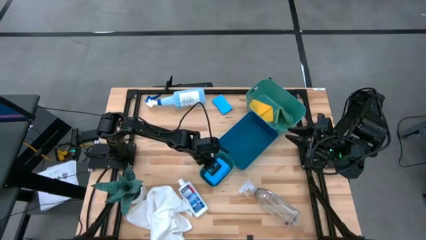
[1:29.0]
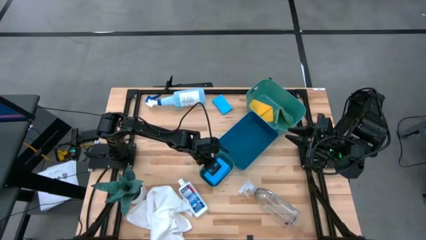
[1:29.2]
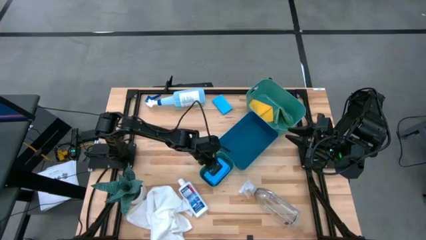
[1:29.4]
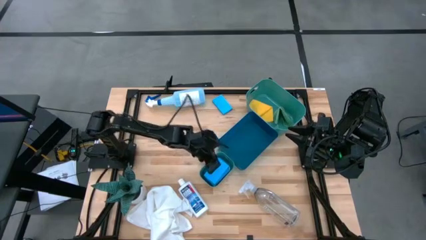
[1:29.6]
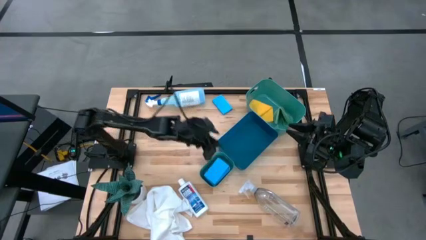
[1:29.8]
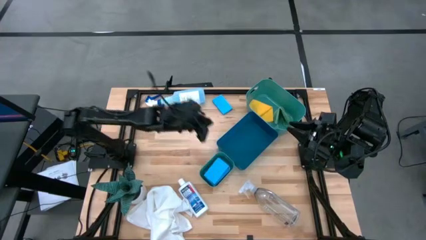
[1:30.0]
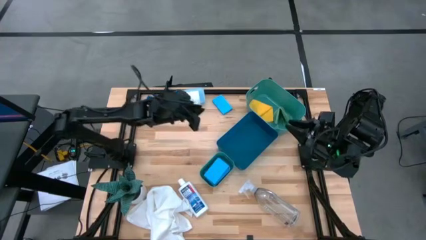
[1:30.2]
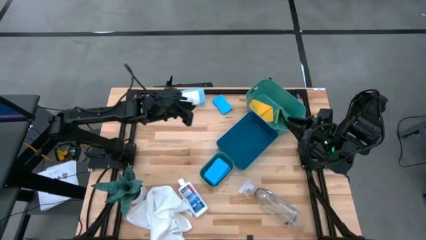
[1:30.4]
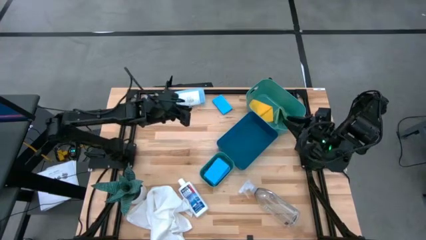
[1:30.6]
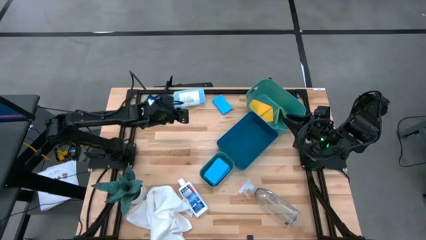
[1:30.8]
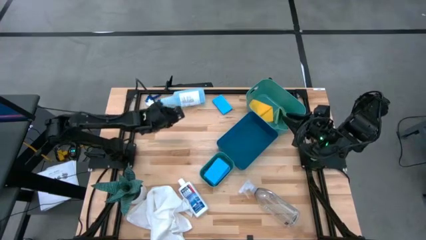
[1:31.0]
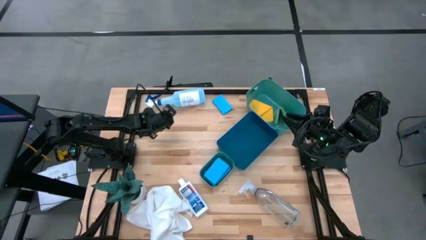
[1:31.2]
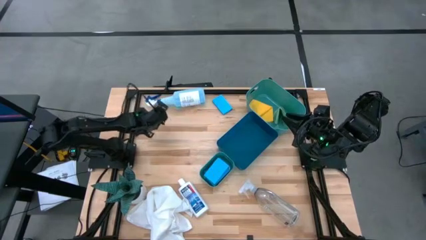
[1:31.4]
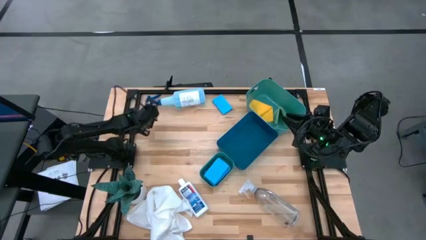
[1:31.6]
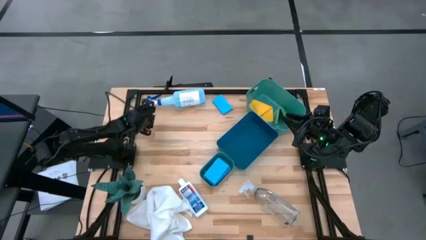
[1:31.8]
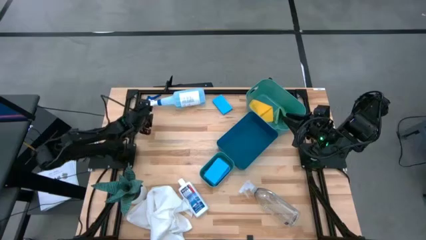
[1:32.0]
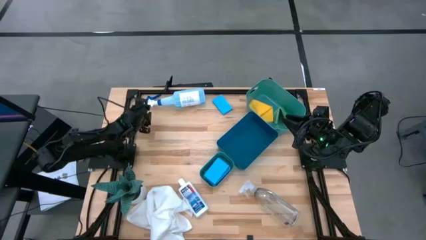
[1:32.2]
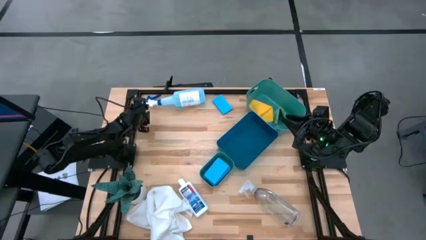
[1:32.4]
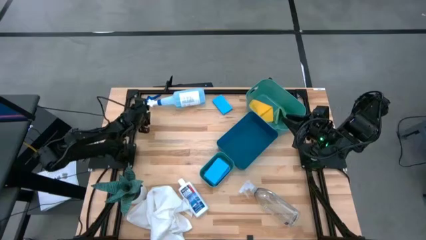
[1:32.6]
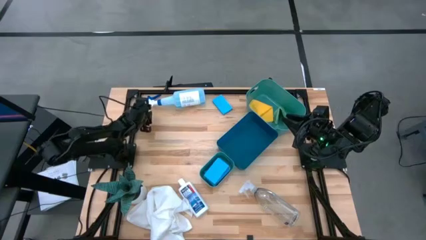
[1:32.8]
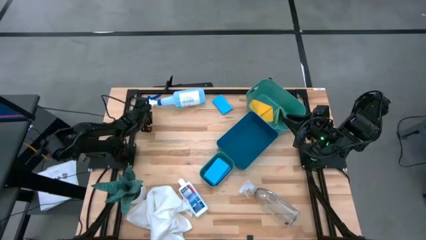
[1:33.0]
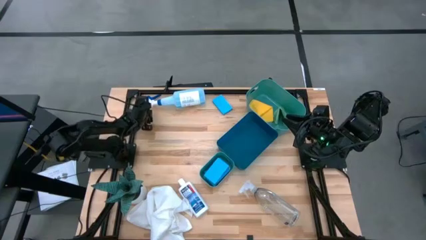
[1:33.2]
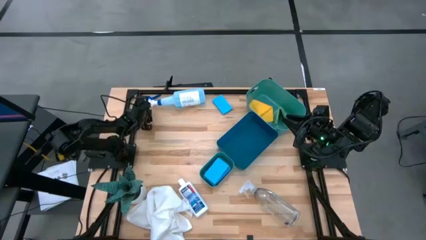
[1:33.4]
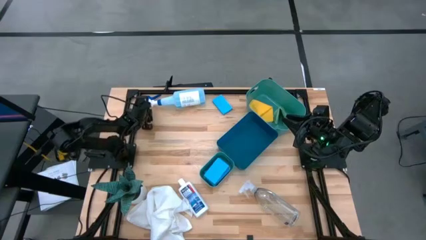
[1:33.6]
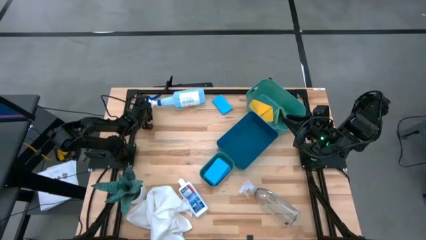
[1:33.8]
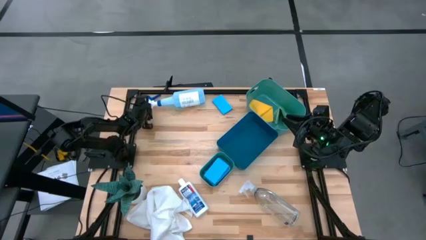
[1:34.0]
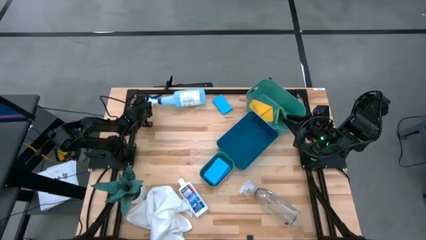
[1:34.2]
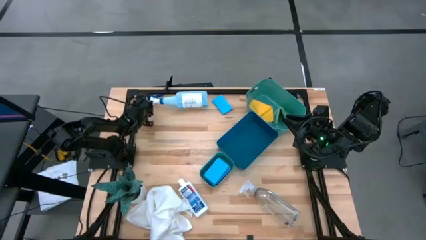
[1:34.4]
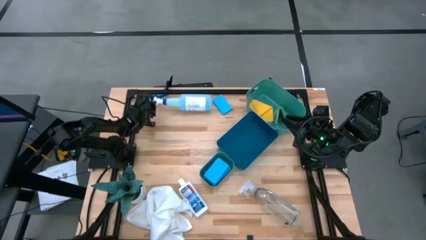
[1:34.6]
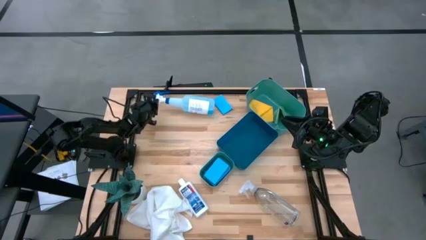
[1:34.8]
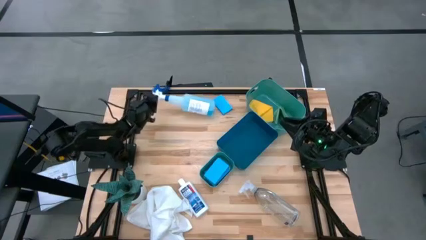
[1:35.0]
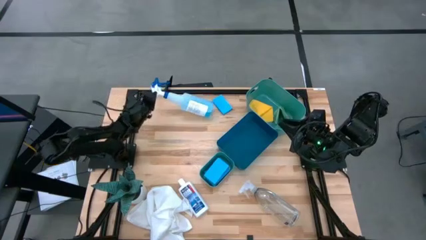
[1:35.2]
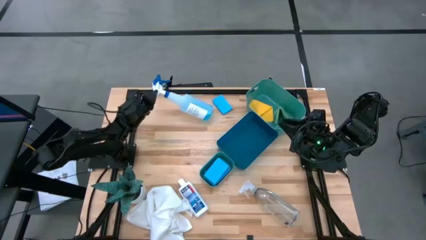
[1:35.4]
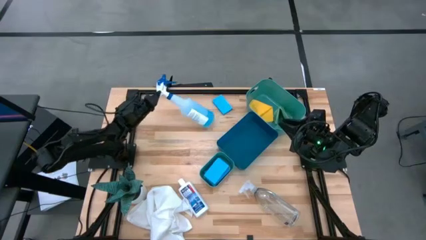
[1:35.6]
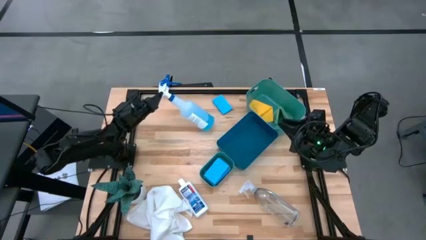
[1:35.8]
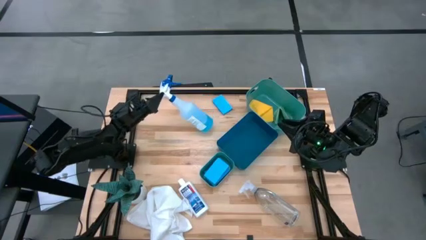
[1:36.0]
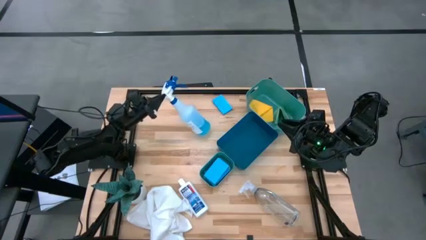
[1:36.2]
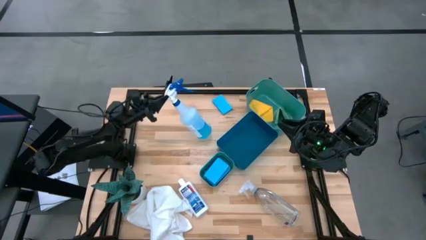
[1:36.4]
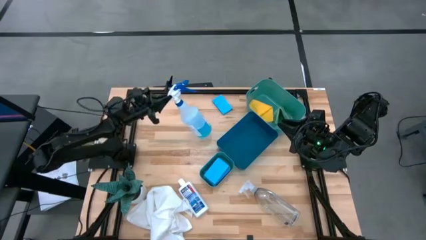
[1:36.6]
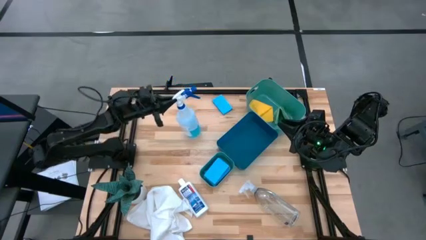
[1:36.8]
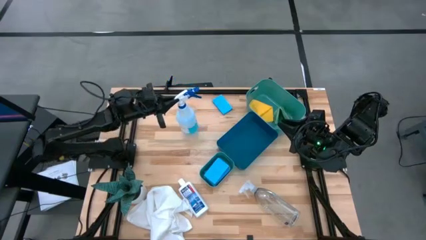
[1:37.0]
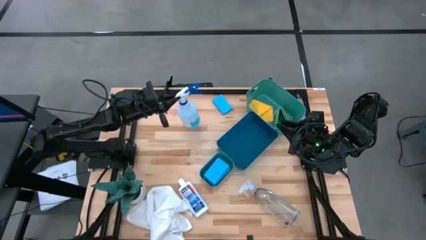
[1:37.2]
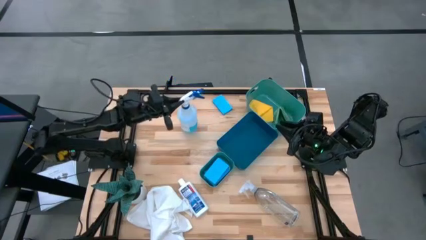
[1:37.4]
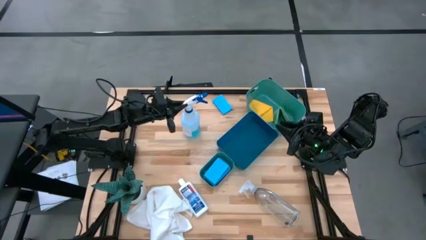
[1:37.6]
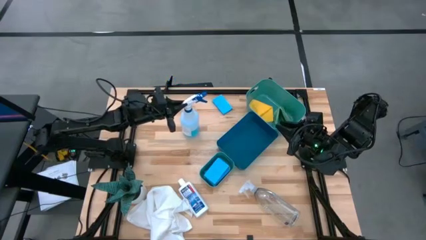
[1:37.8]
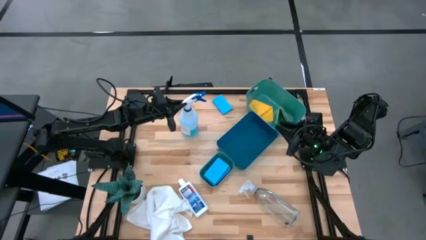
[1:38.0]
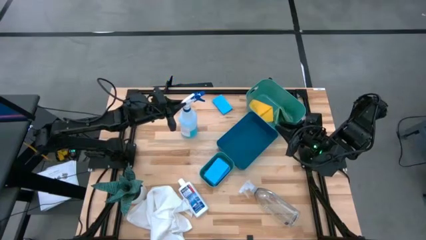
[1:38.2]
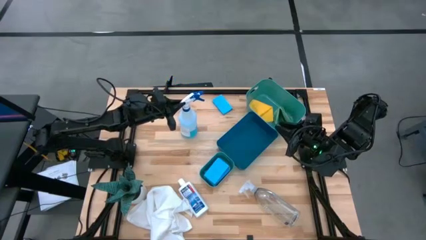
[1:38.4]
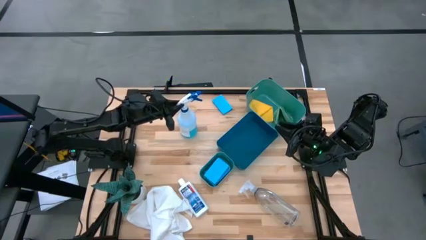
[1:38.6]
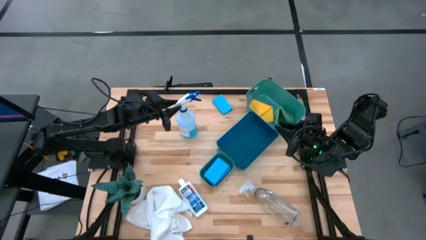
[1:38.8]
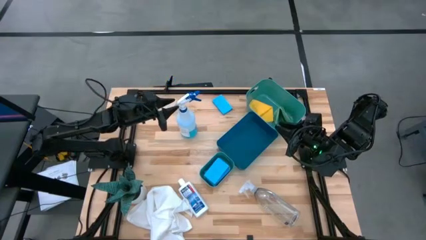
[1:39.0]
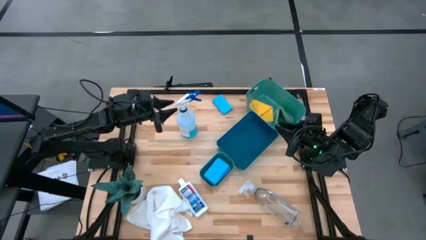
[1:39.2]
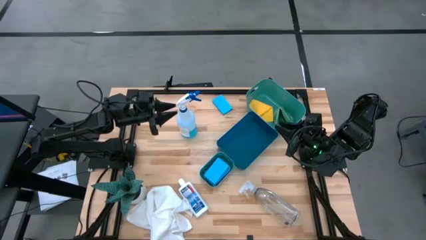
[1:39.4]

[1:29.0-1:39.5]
Task: Pick & Place Kitchen Items
Put the blue spray bottle into the blue bin

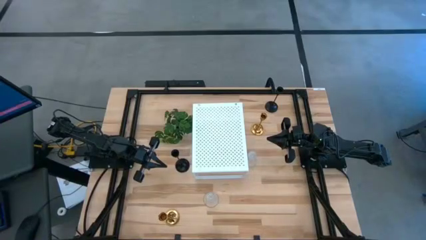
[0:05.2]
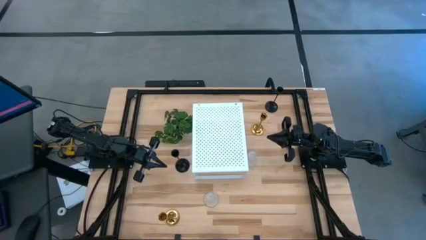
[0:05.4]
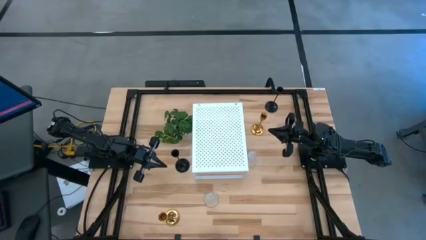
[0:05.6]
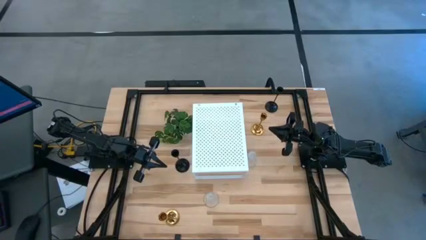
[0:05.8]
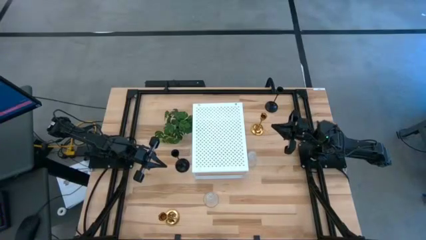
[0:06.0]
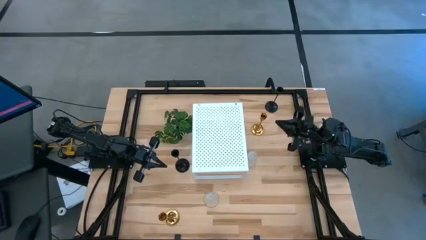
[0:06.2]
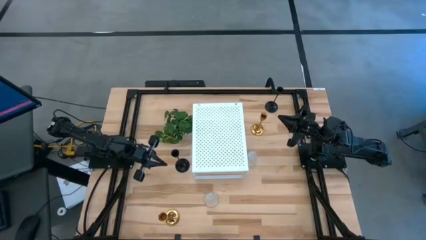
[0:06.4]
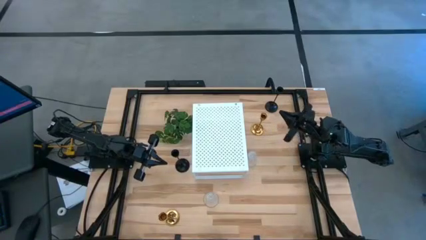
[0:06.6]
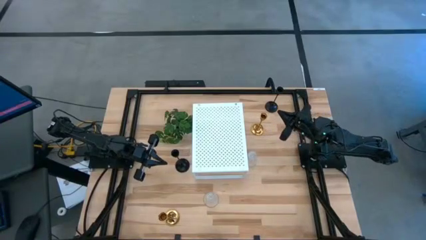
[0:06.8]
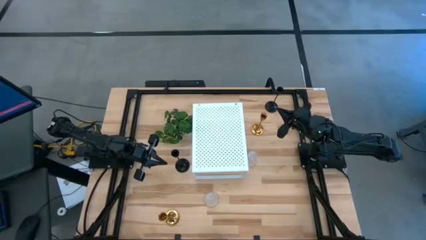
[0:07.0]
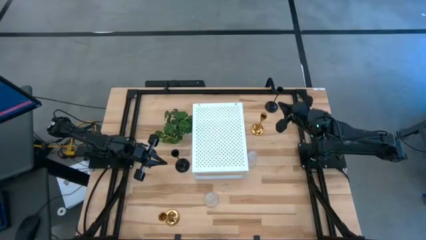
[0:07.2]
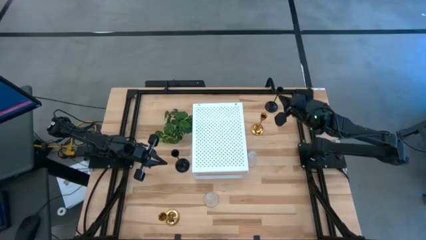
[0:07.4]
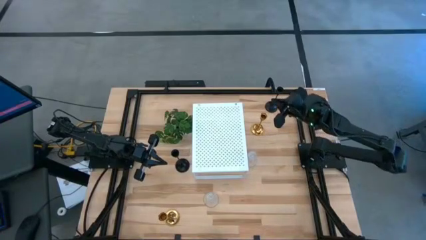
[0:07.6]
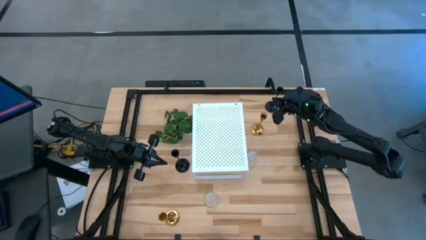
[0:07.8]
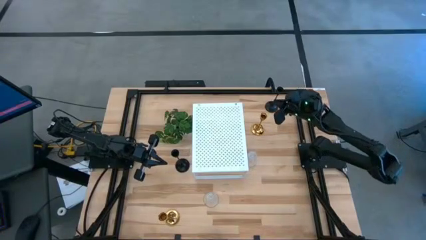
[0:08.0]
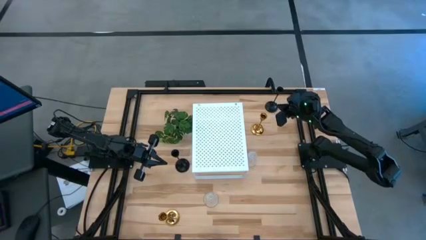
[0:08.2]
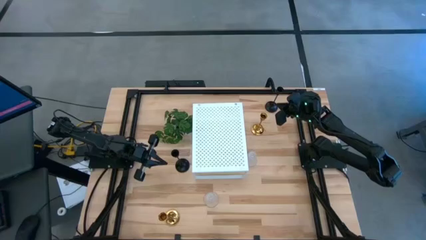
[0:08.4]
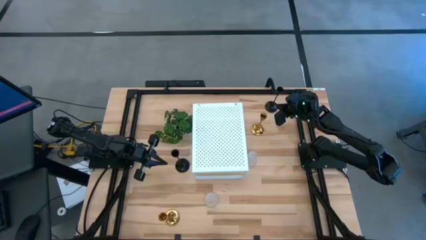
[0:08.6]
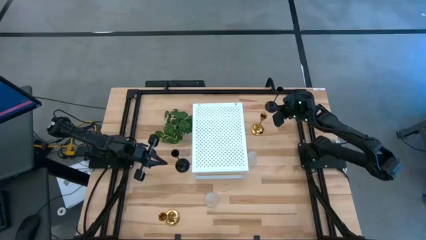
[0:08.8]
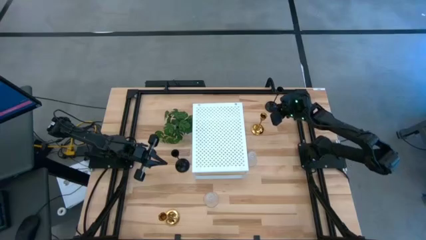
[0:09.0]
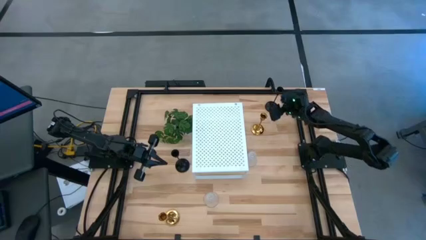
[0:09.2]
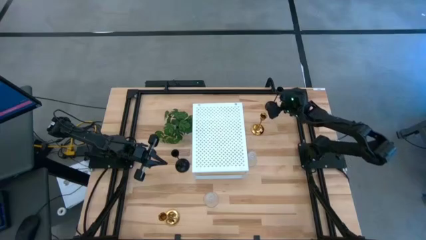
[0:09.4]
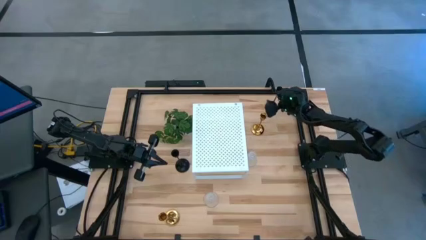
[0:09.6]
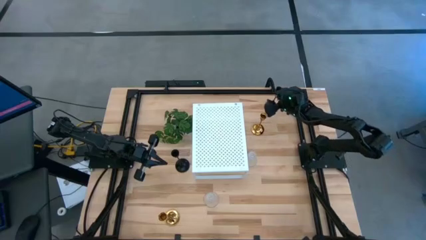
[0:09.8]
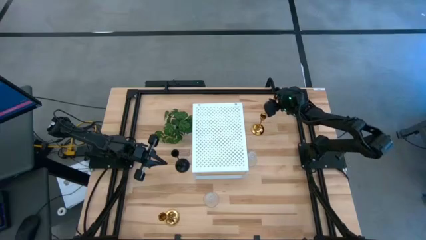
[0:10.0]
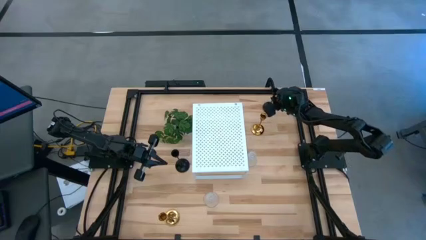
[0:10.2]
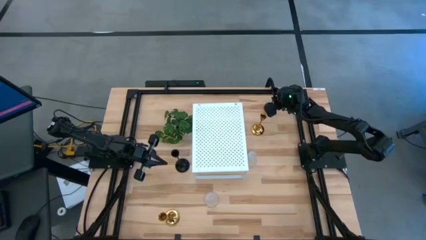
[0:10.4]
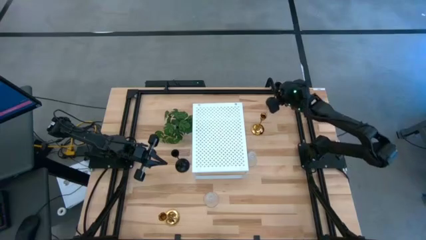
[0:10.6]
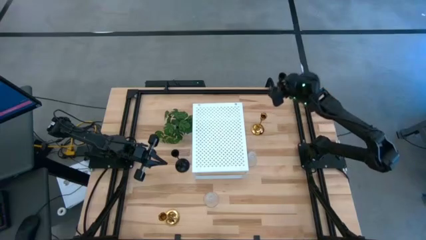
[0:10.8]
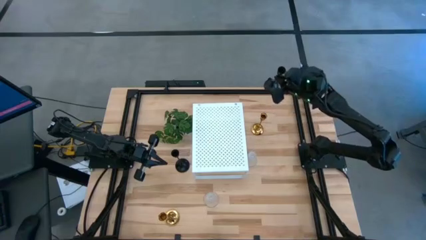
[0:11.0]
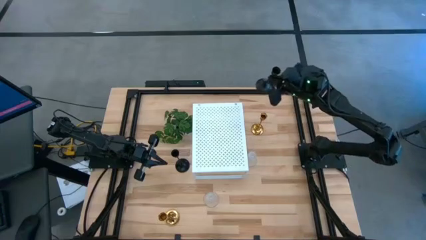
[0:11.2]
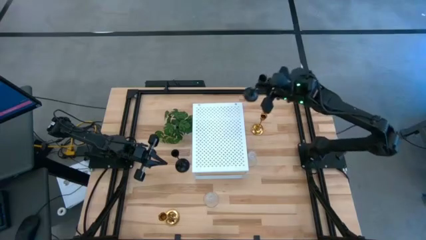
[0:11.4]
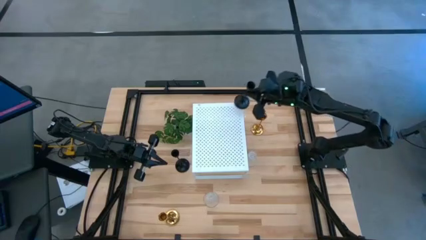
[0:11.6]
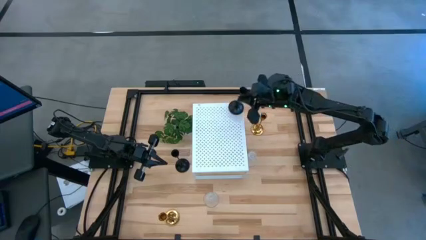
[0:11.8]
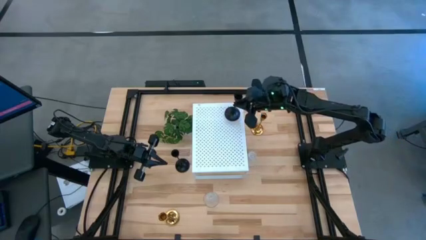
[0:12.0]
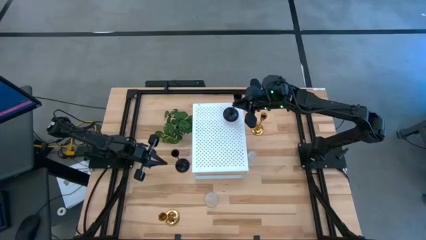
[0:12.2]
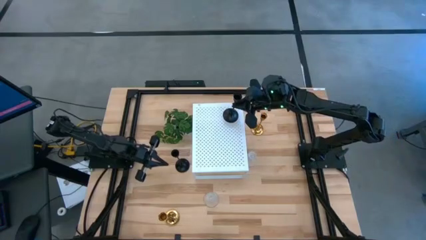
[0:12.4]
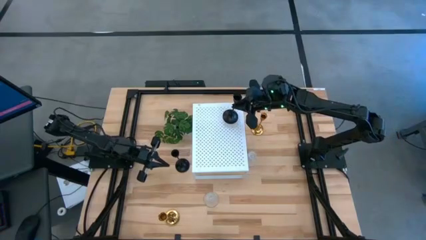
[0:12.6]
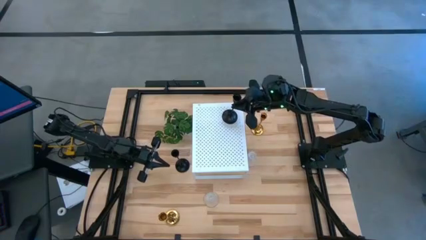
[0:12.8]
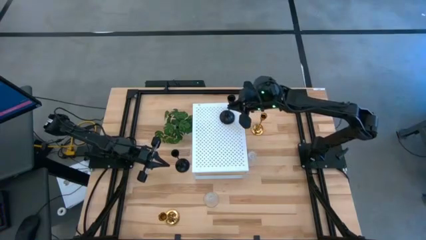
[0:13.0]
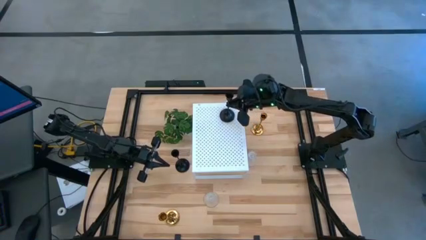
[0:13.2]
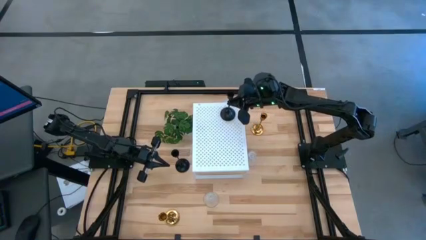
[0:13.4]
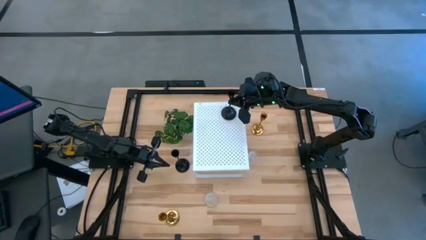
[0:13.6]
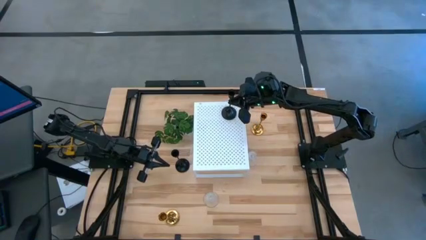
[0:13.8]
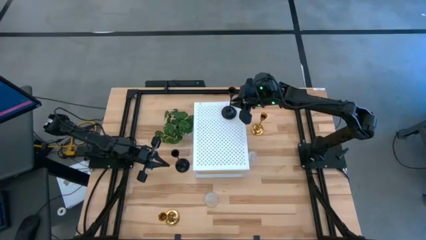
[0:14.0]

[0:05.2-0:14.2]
Task: Pick & Place candle stick holders
Put the top black candle holder on the shelf
